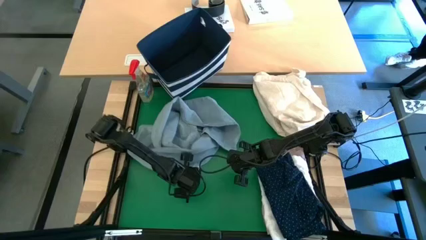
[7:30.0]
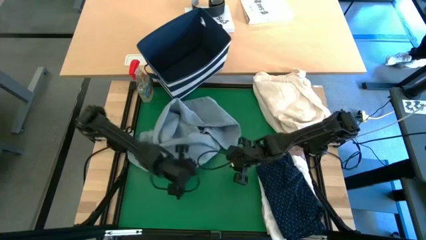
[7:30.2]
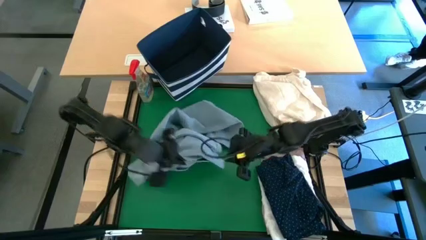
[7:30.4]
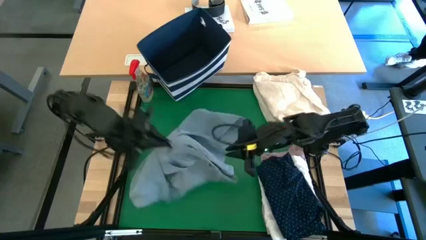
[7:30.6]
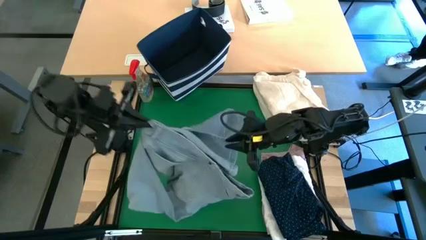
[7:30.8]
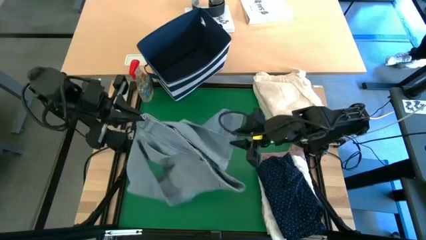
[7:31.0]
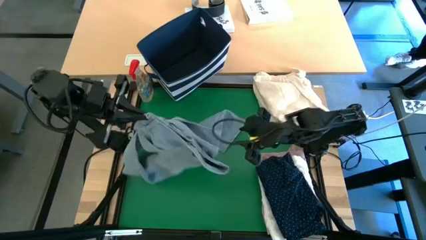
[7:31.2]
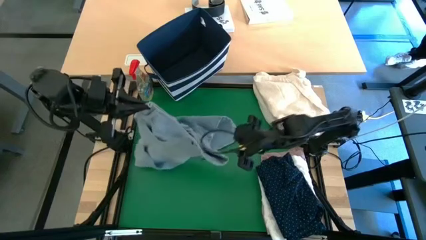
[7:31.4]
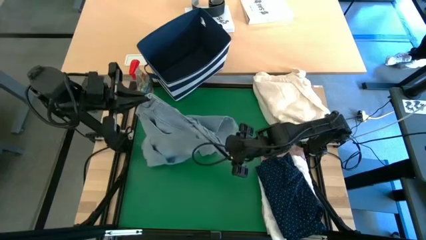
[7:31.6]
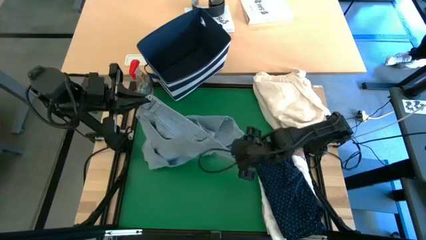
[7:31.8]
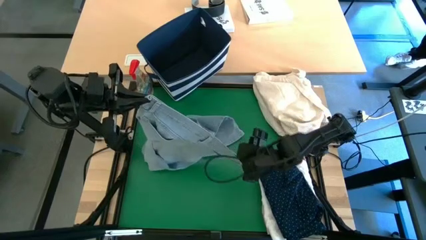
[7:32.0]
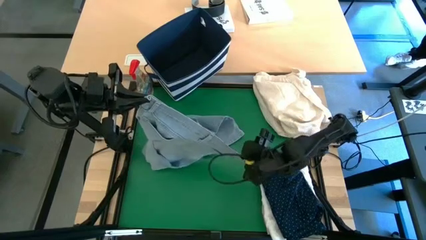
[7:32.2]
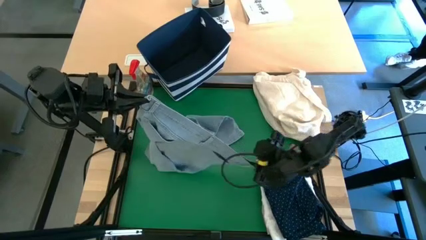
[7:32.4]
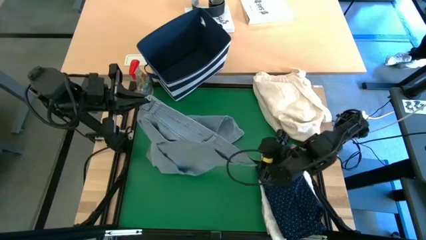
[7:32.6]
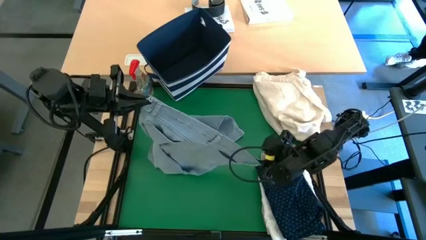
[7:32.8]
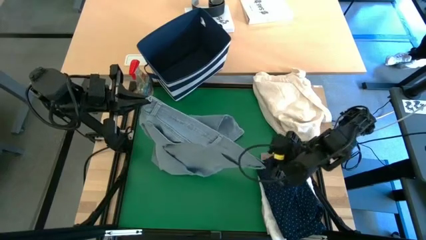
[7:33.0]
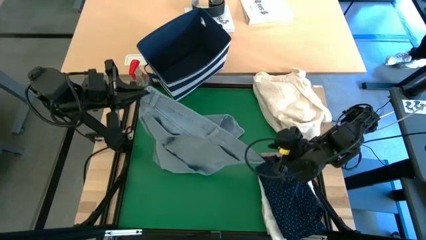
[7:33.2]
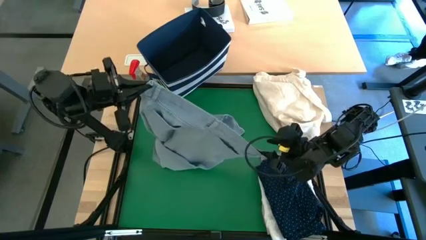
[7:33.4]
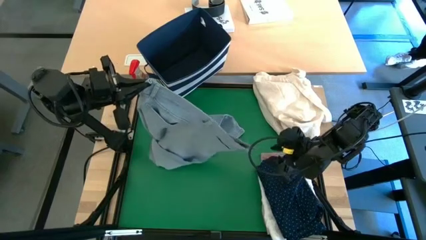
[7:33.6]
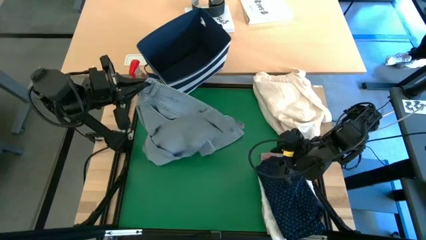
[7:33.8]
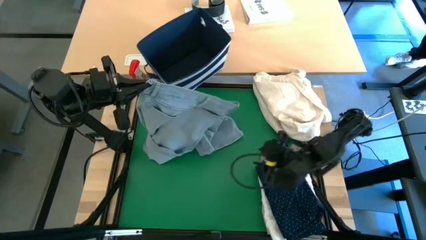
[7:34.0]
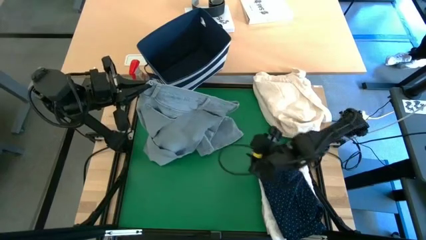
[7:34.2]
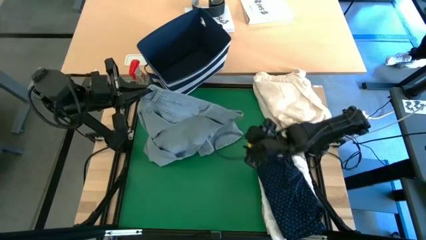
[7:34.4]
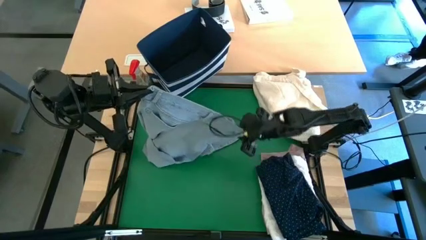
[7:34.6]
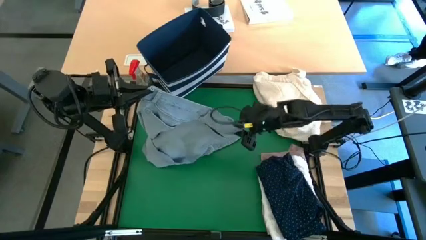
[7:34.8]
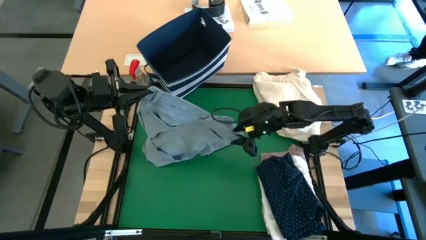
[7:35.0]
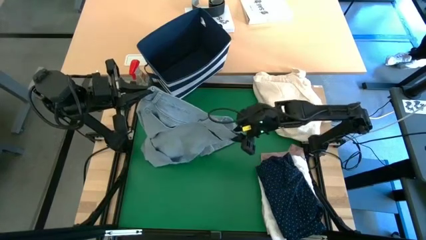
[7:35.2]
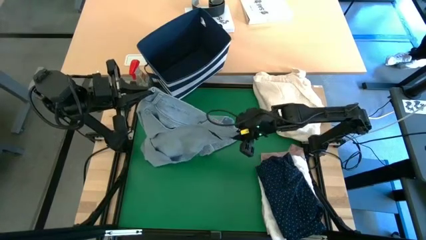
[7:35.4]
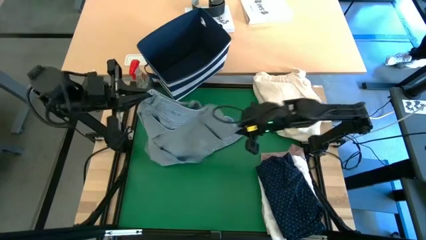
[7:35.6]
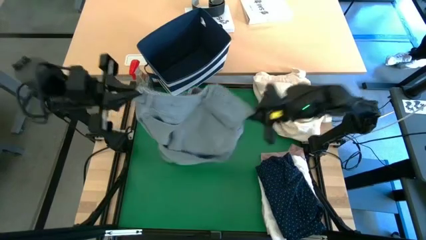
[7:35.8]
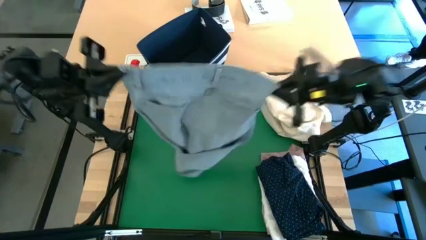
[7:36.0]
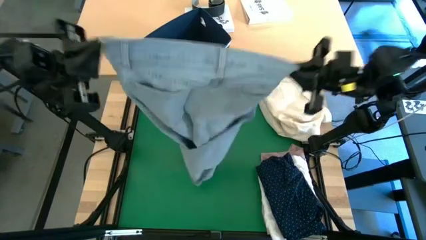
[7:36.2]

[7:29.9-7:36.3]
Task: Fold laundry
Fold the blue jeans

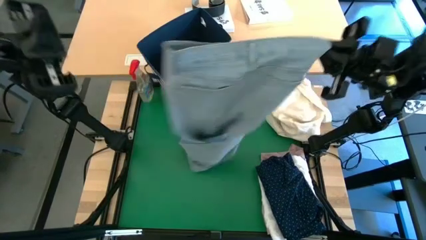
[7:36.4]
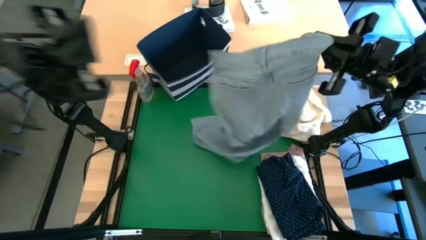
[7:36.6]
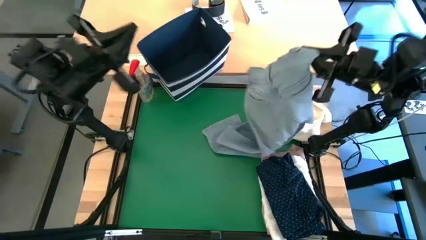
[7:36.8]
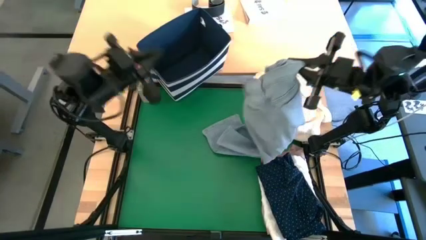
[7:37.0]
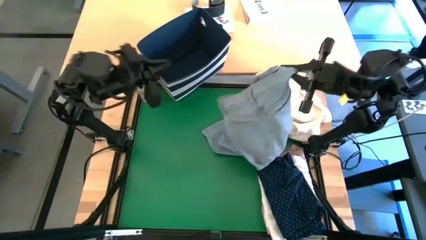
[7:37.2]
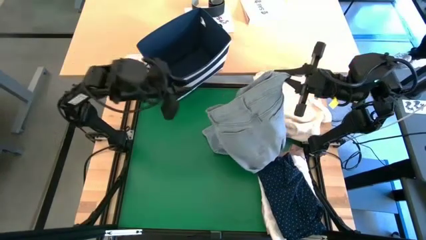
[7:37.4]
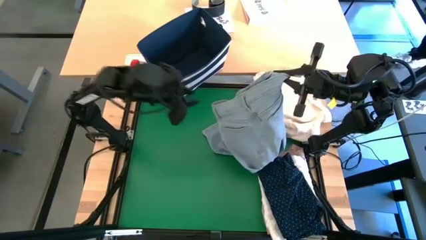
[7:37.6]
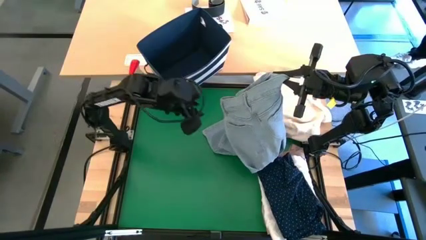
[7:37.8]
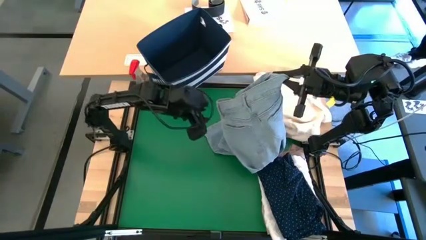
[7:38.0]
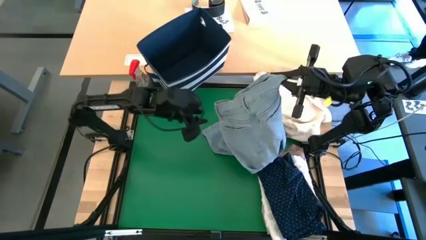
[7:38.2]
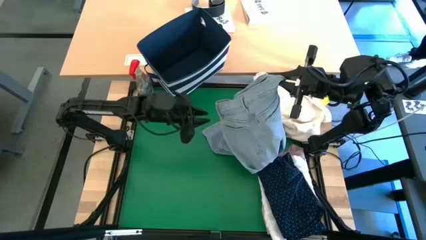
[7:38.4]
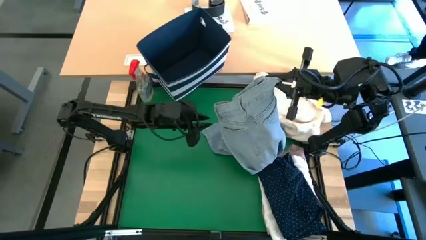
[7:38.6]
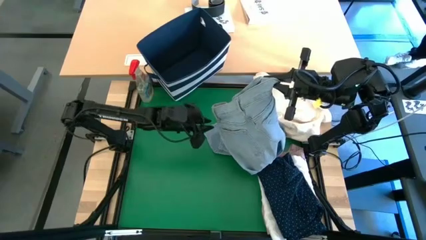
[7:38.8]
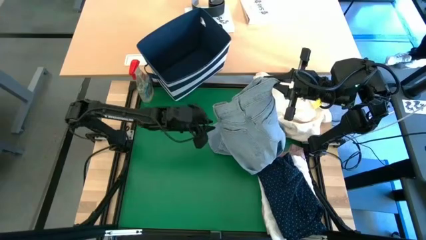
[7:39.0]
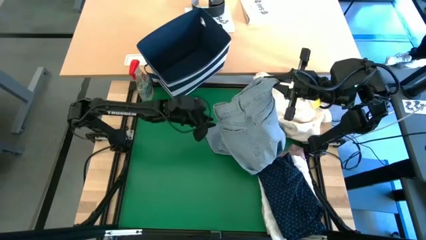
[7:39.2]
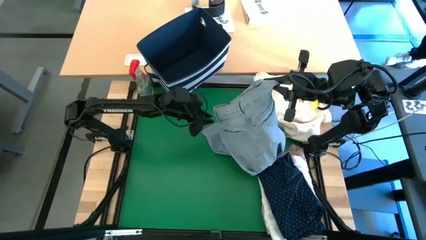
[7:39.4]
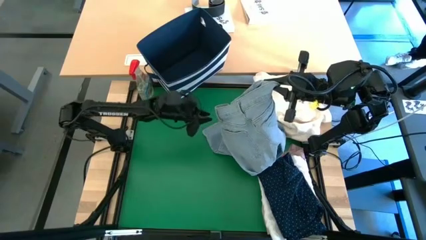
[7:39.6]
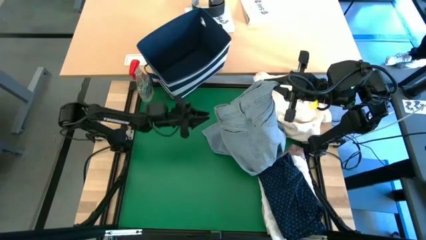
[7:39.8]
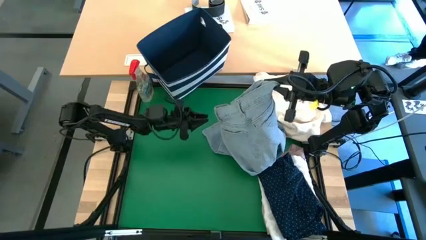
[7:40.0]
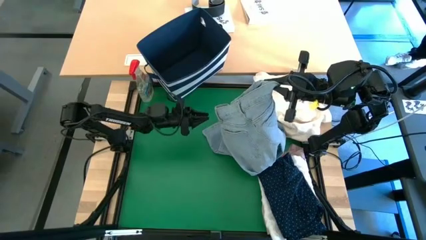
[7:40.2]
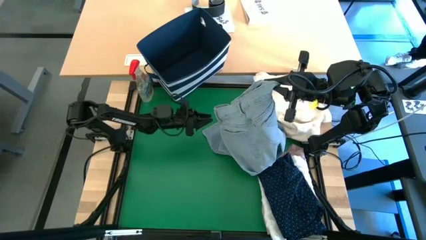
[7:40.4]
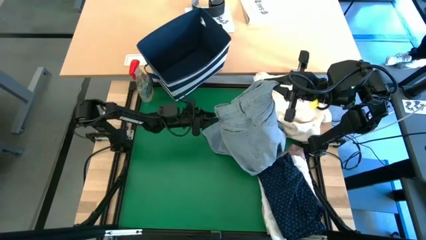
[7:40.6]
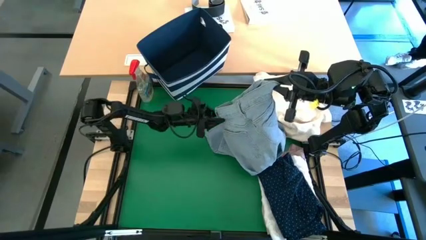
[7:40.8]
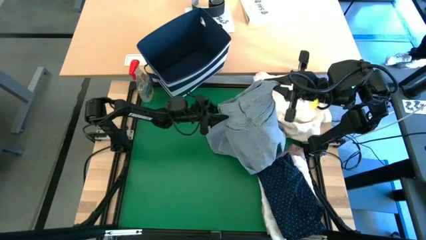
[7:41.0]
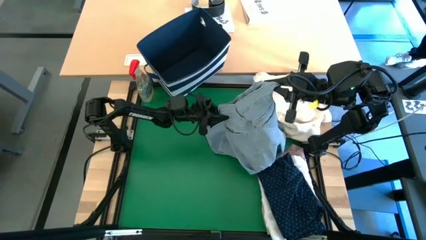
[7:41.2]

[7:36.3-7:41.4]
Fold the blue jeans

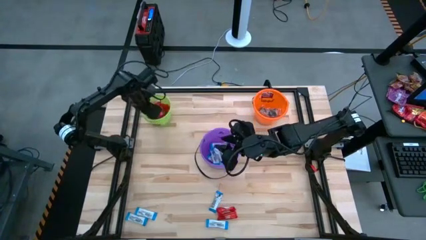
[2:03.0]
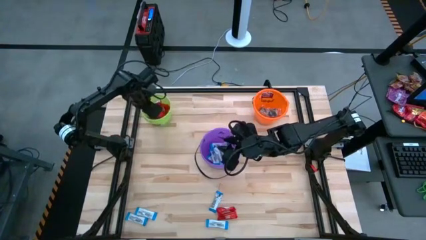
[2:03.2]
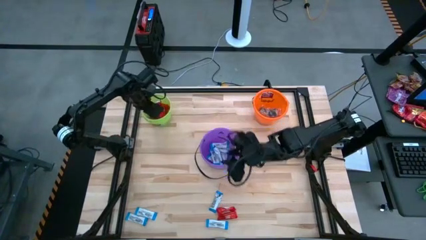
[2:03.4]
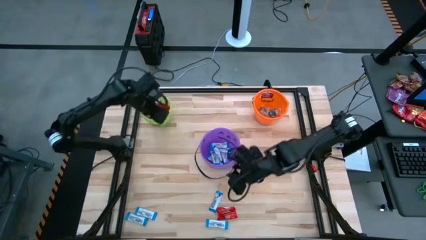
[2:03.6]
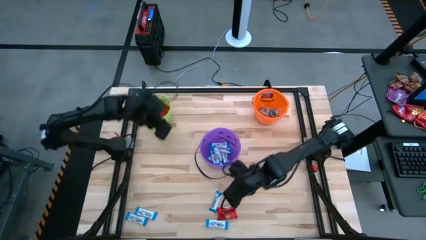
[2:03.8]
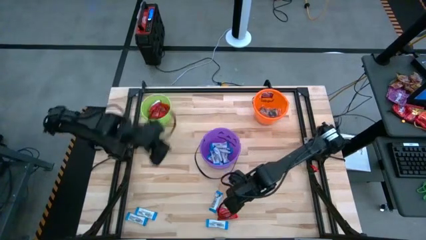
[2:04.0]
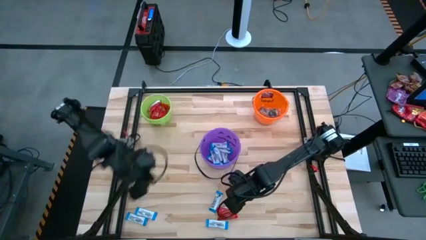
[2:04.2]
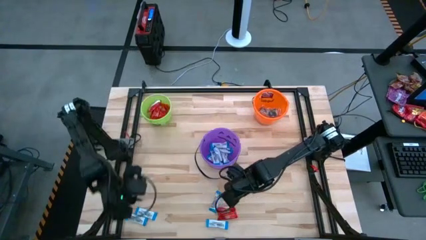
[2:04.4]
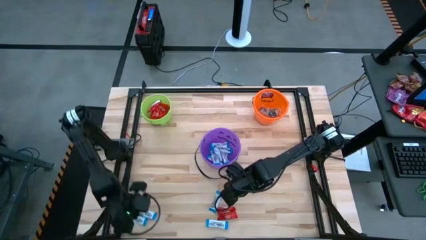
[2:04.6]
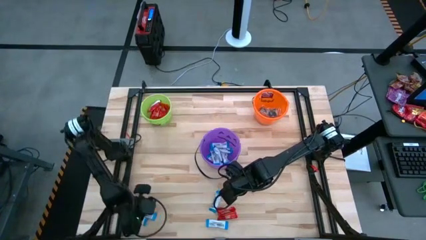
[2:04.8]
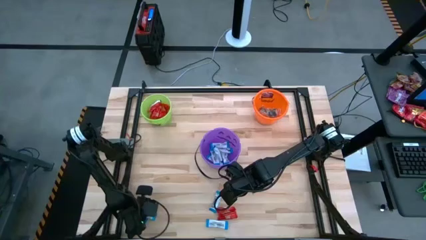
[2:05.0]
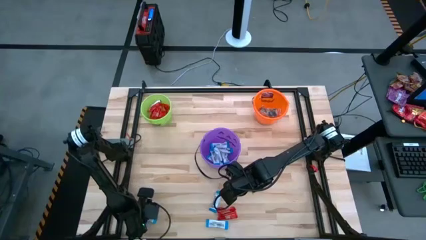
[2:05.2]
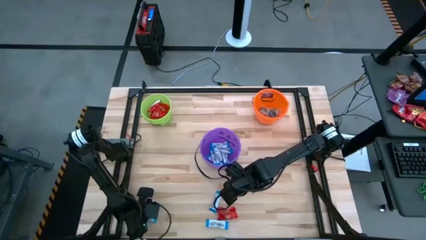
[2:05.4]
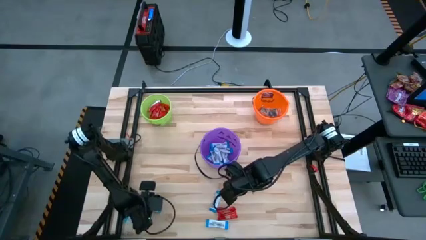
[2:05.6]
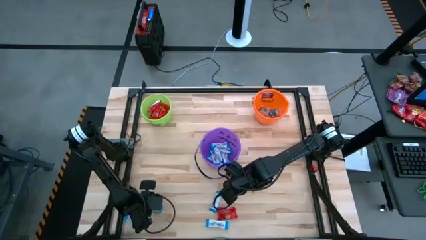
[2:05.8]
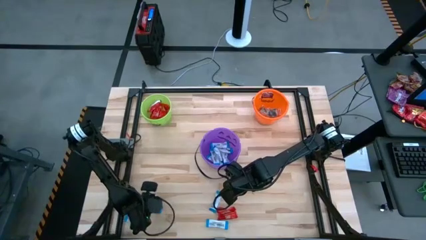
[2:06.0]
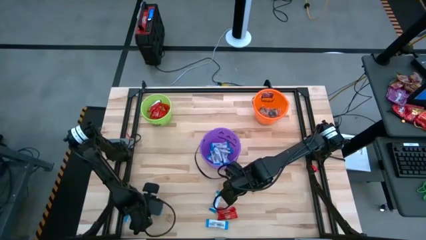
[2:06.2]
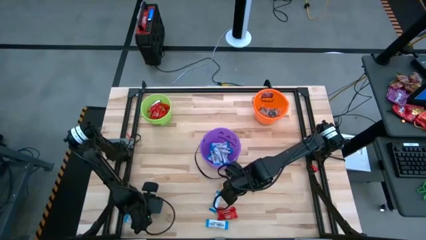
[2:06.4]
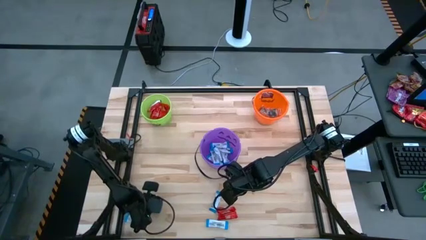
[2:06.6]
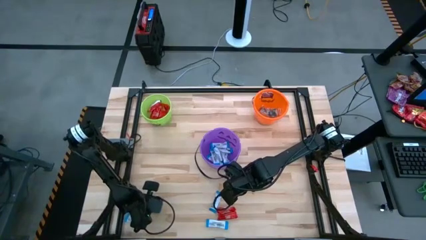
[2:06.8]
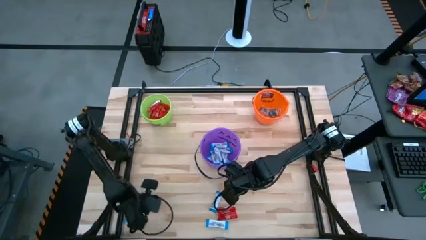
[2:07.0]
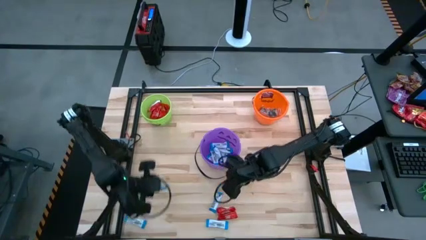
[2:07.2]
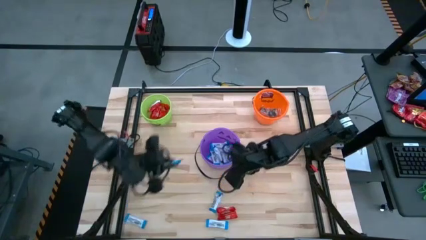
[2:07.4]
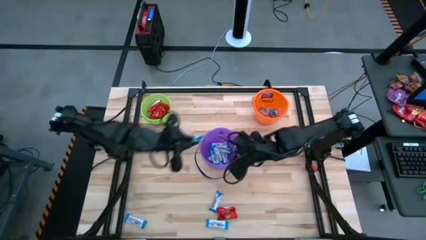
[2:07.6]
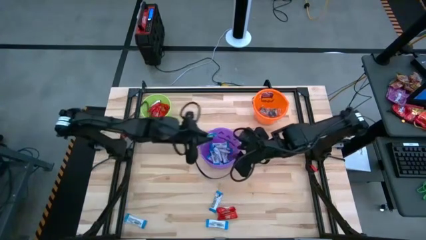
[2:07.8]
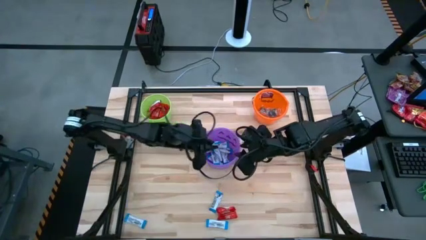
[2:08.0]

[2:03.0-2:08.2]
Task: Sort candy by brand, put in halloween buckets
Put the white chocolate into the purple bucket
